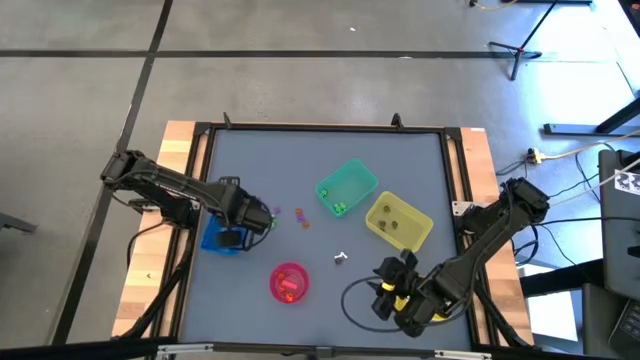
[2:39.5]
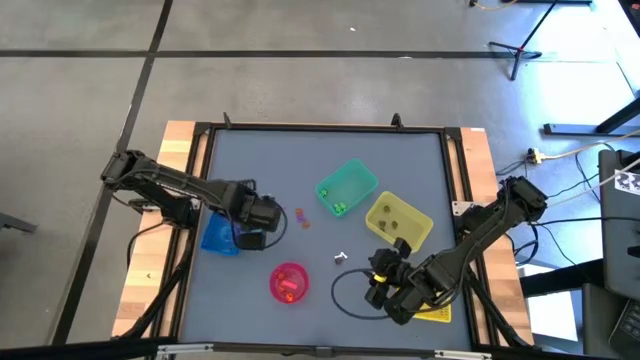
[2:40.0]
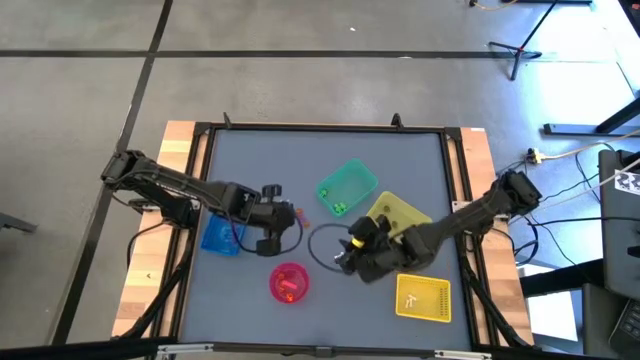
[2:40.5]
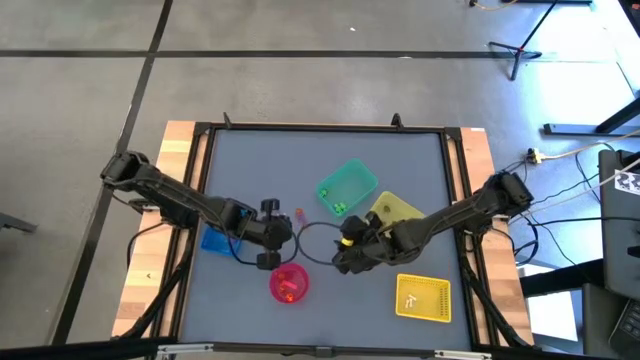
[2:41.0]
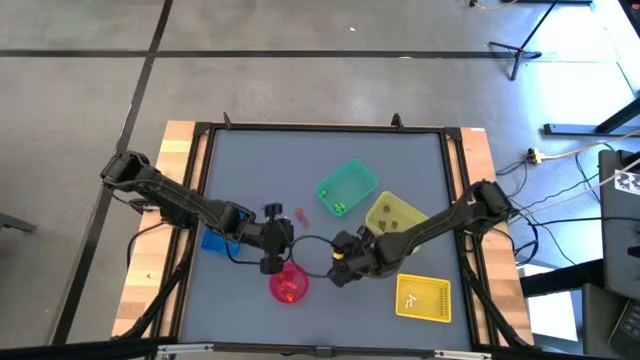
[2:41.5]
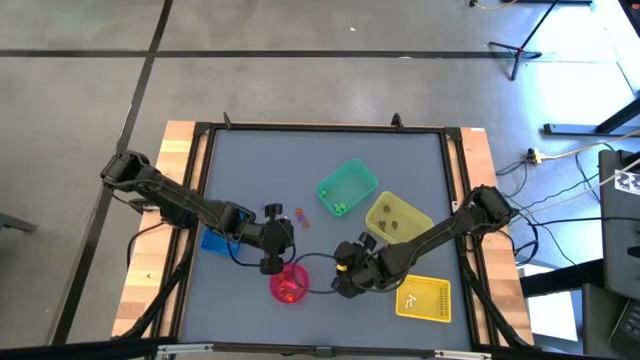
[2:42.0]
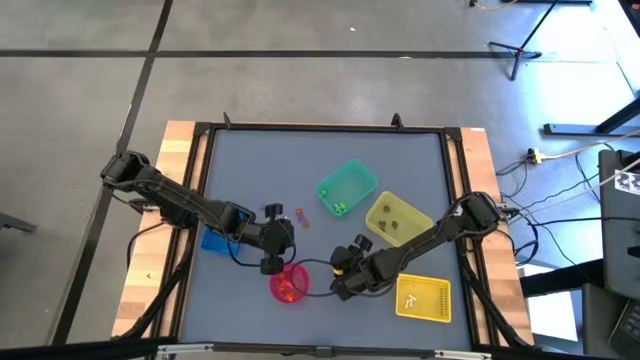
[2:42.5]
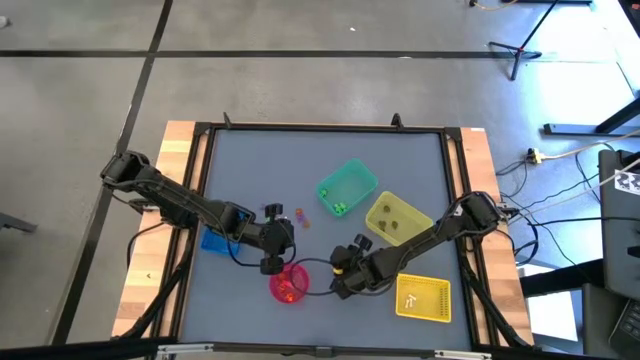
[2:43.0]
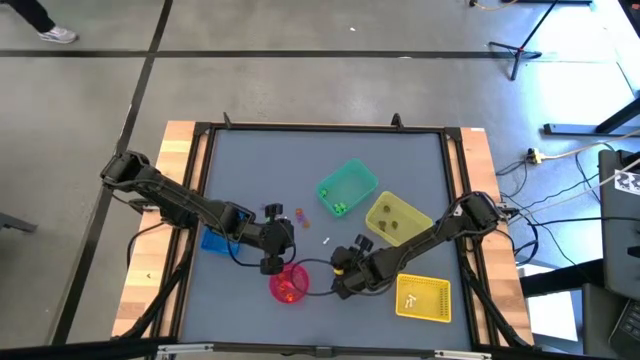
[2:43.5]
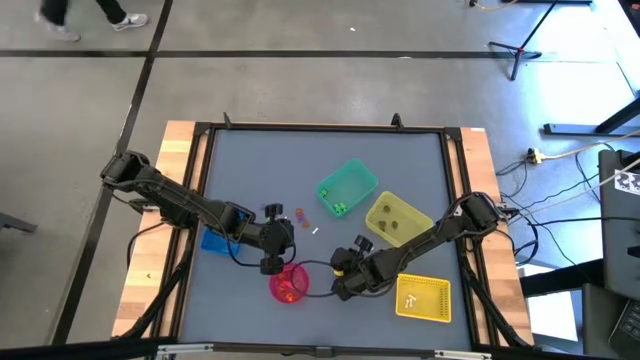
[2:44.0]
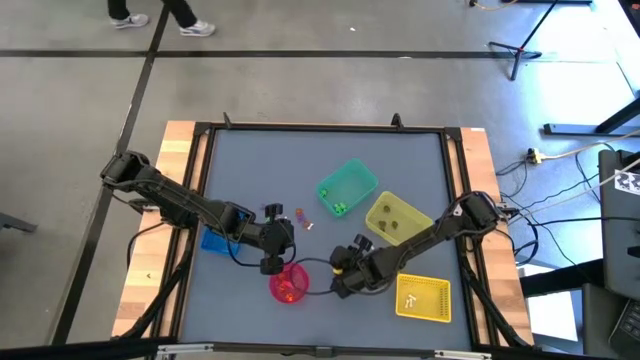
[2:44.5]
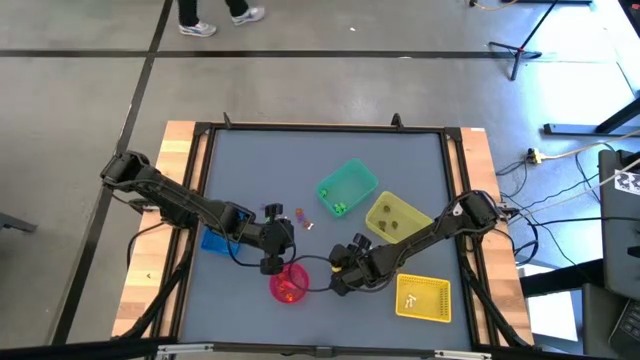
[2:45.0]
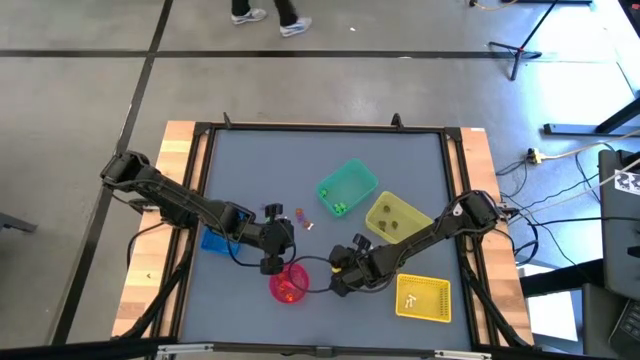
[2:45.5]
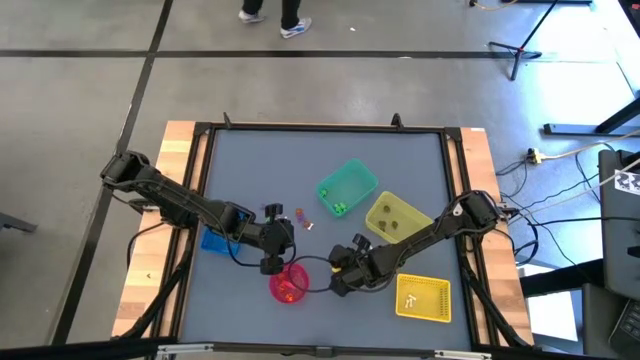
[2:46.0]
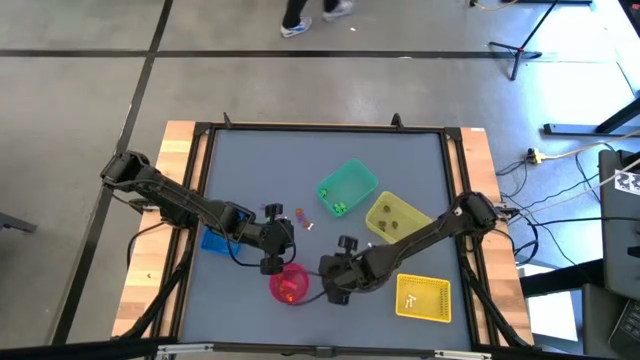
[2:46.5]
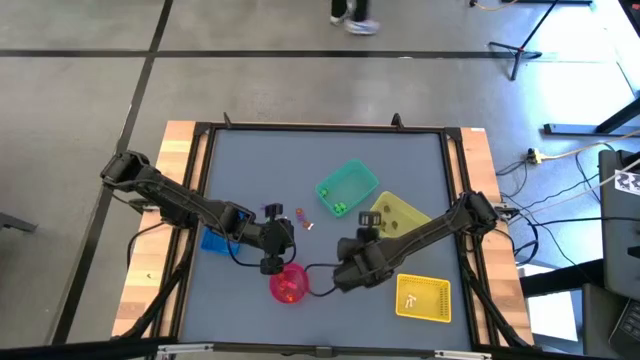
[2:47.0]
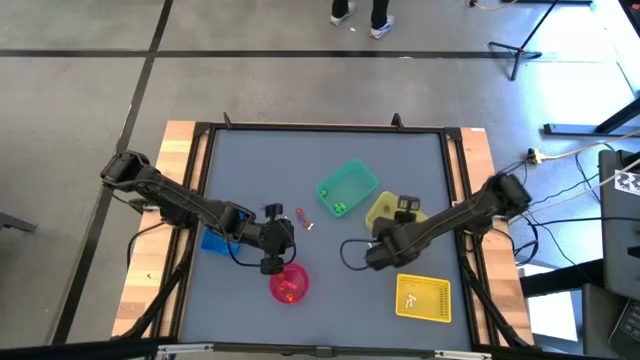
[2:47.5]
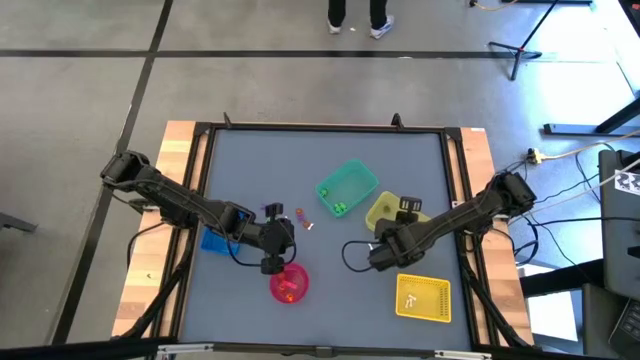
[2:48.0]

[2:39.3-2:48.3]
Task: Sort Halloween decoration
Put the black skull toy into the light yellow bin

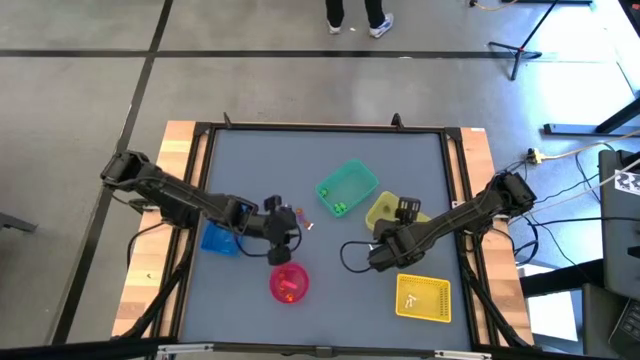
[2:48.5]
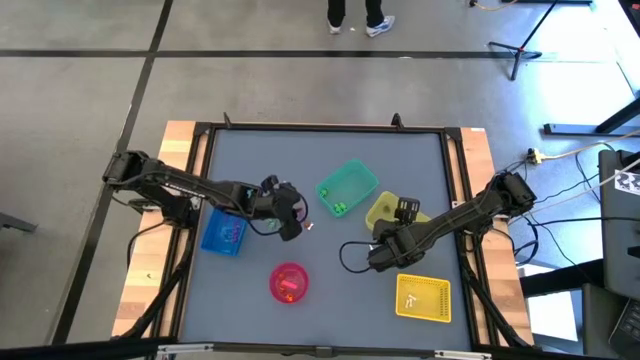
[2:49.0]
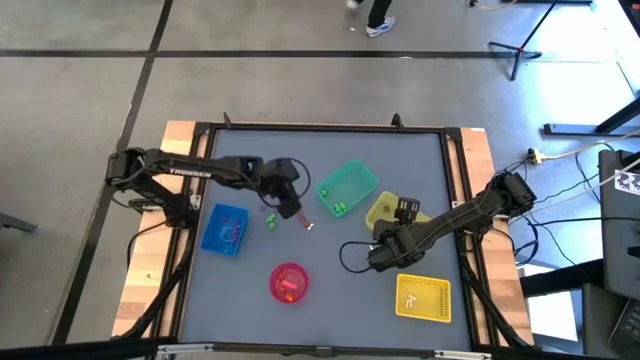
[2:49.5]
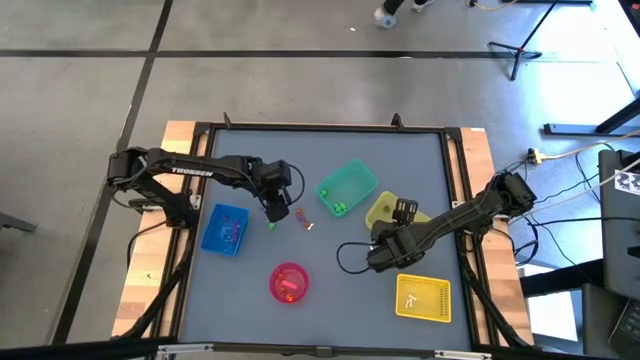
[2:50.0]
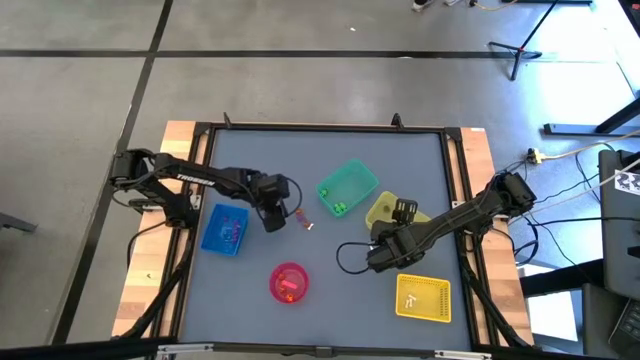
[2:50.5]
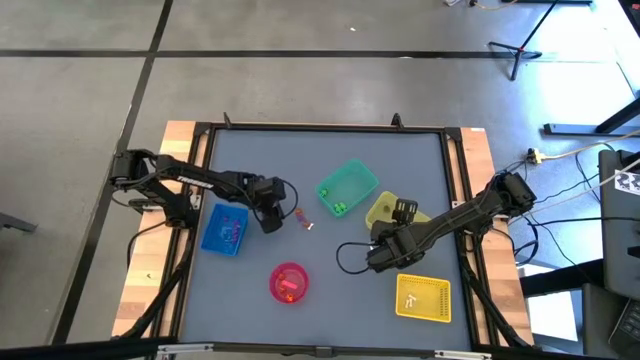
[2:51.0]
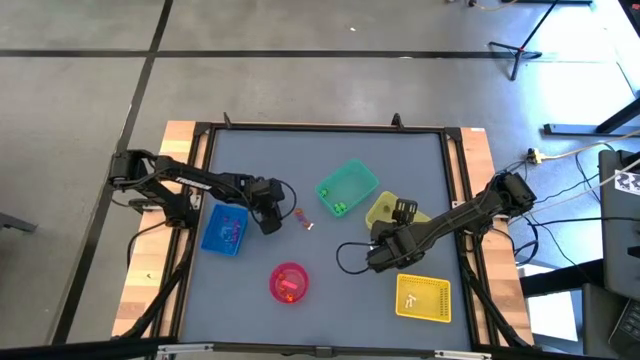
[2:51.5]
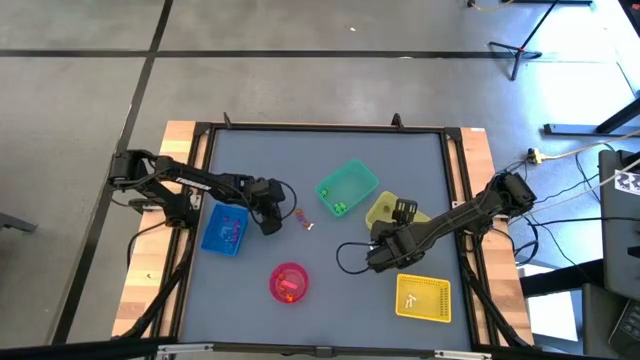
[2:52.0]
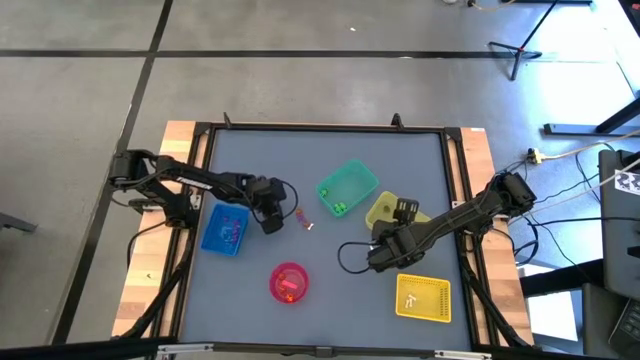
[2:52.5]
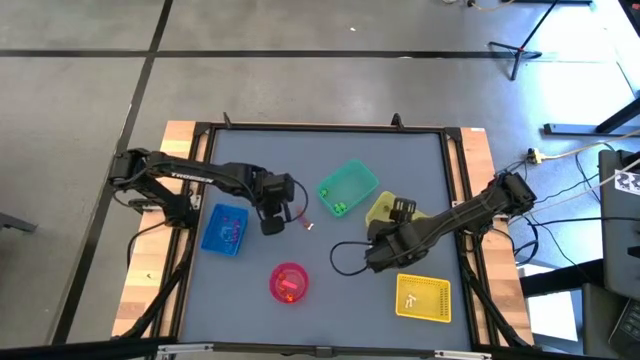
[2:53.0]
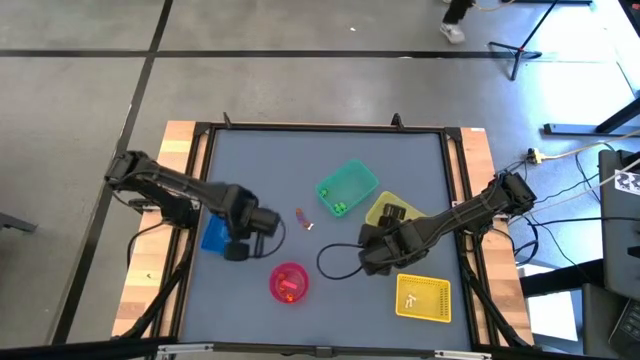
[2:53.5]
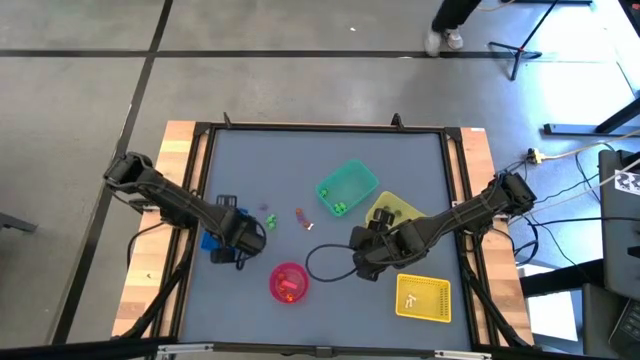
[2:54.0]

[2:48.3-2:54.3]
Put the violet spider toy into the blue bin

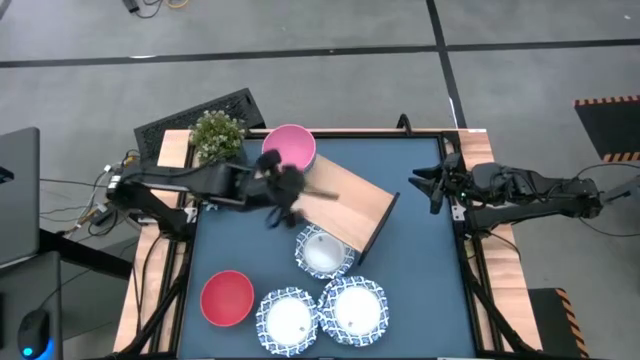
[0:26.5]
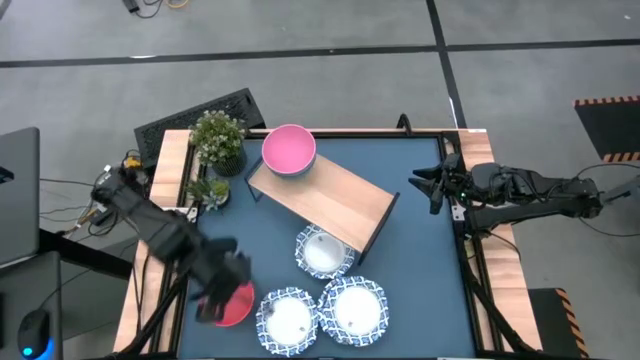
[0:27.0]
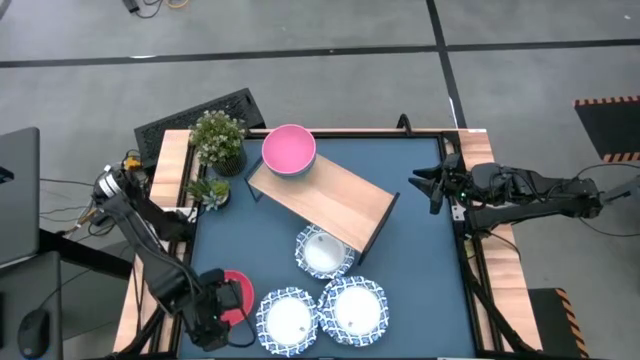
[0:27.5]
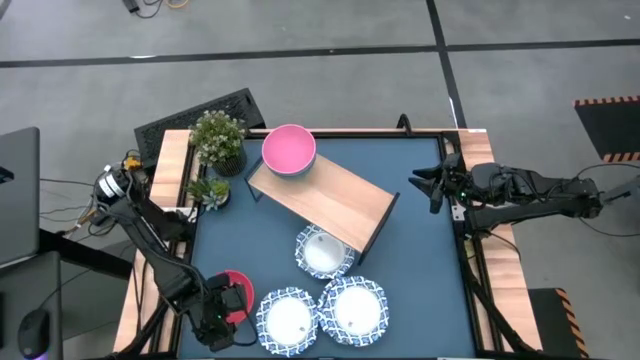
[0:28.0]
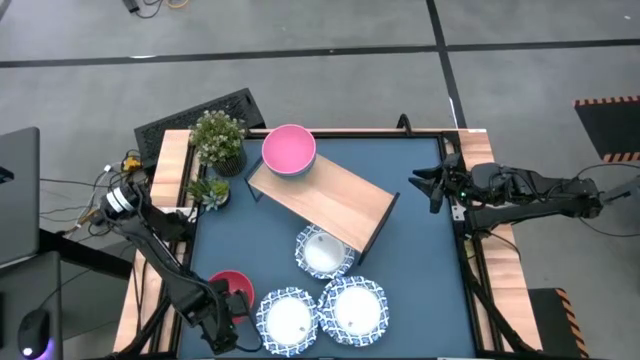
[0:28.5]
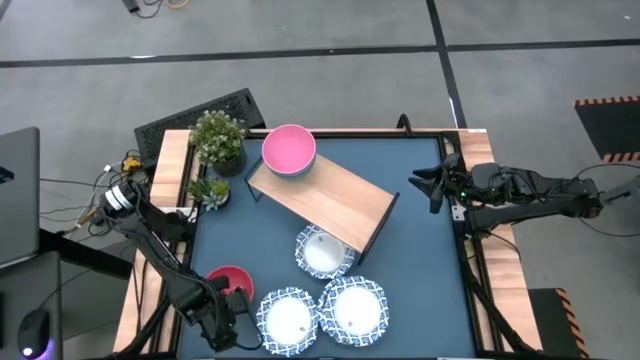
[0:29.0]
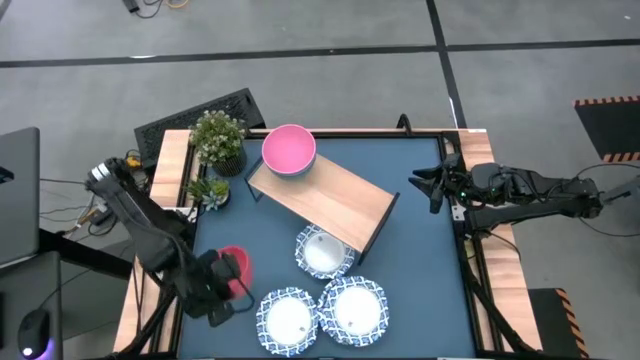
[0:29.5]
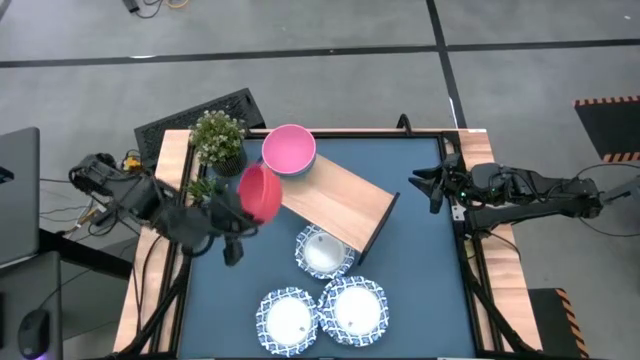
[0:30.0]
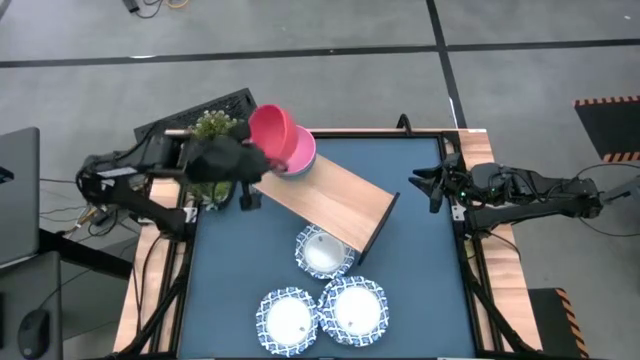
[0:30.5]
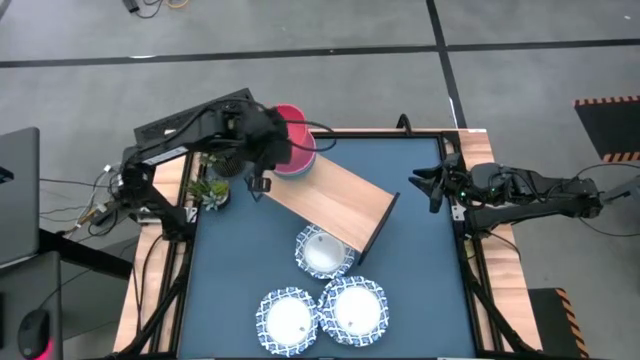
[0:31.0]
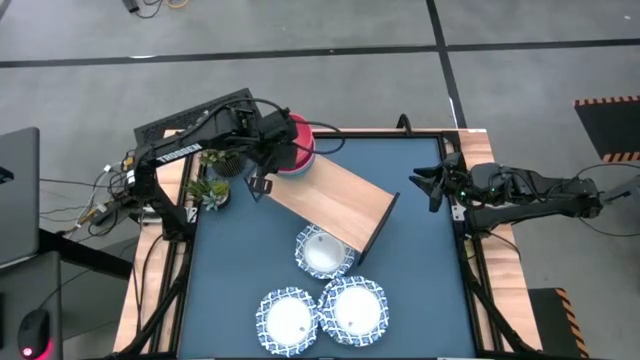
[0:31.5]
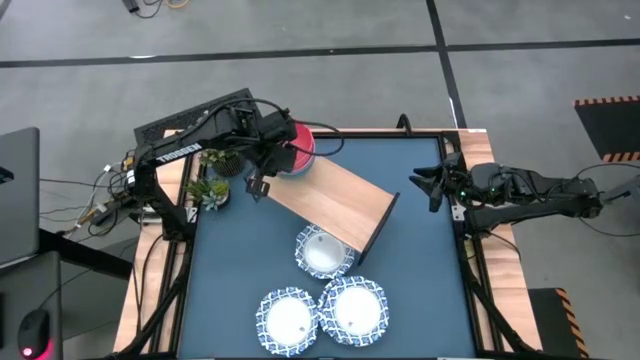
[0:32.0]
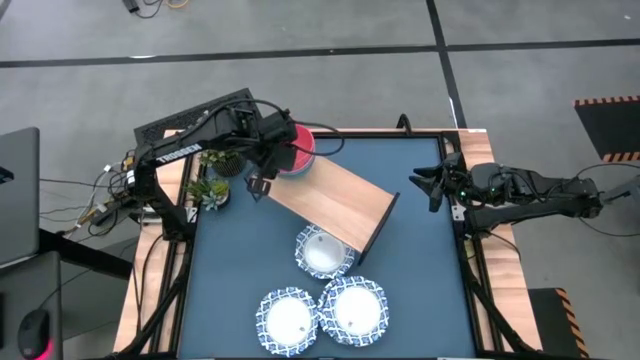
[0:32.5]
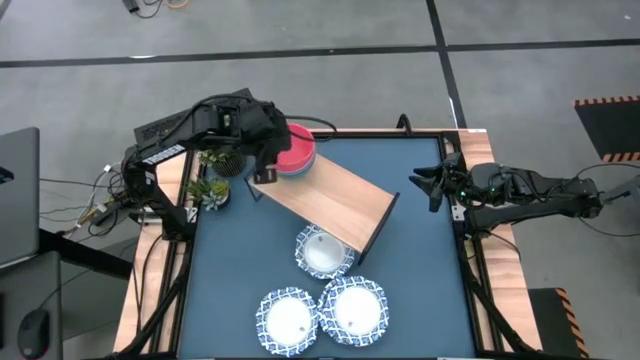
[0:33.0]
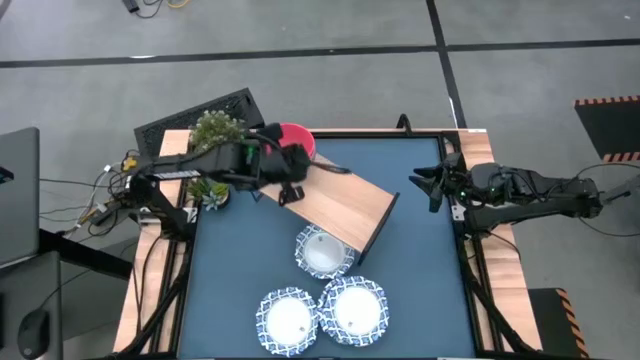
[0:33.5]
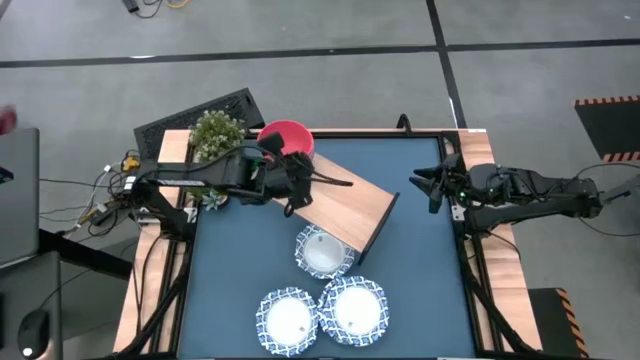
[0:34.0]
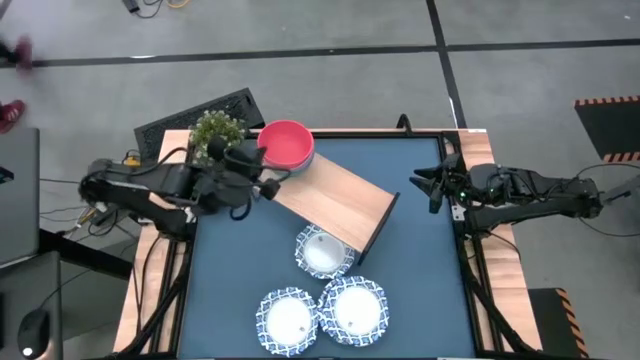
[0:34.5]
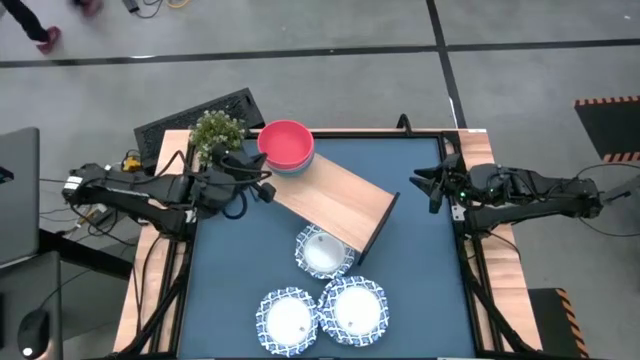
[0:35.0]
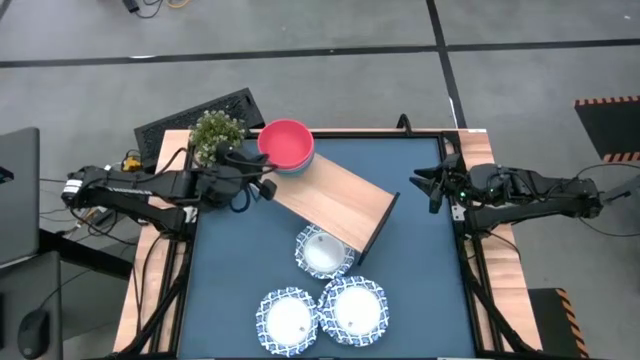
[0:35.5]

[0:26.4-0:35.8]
Task: Place and stack bowls onto a shelf
Stack the orange bowl on top of the pink bowl on the shelf
